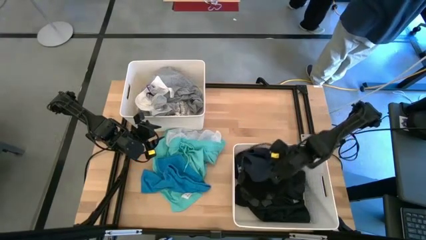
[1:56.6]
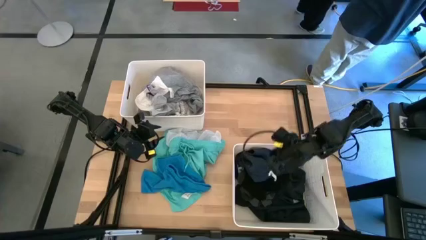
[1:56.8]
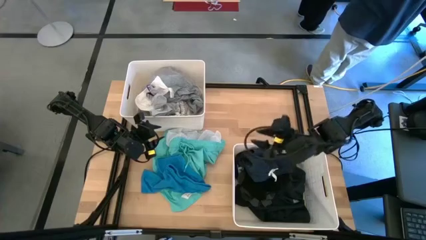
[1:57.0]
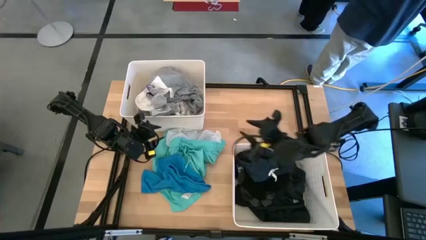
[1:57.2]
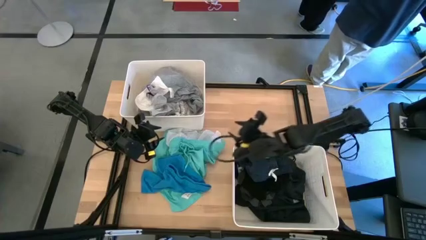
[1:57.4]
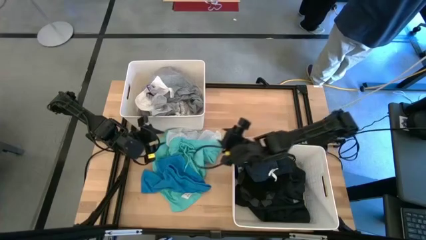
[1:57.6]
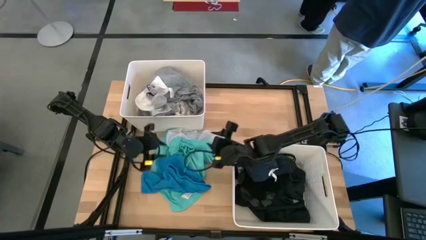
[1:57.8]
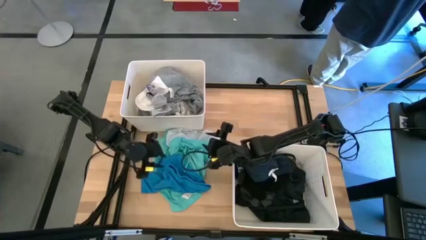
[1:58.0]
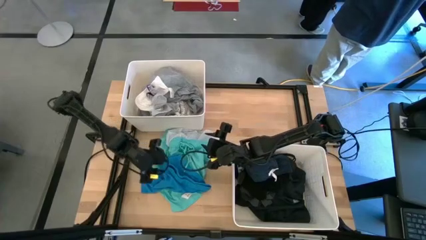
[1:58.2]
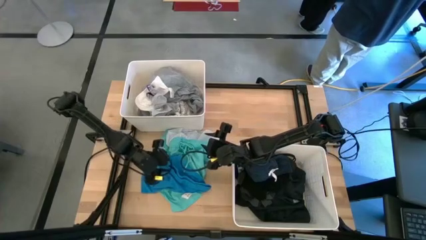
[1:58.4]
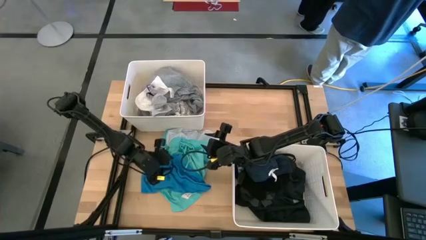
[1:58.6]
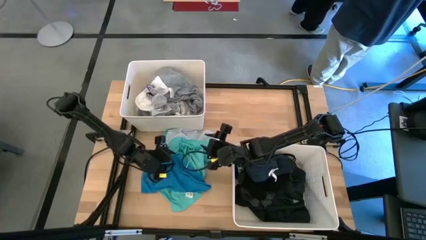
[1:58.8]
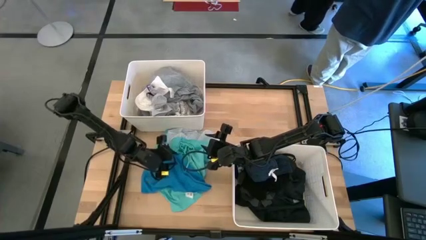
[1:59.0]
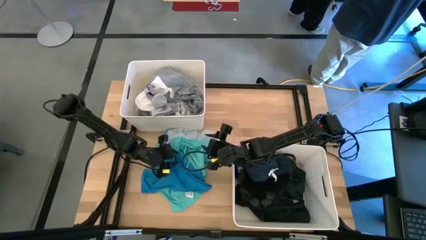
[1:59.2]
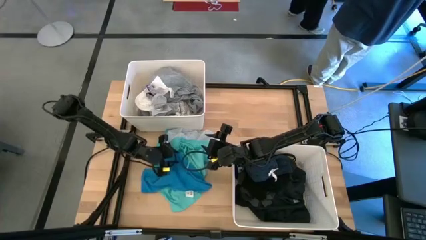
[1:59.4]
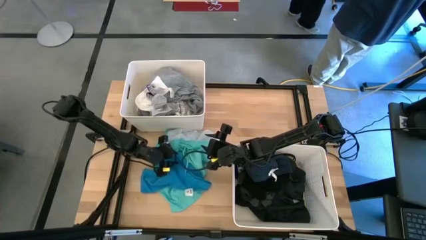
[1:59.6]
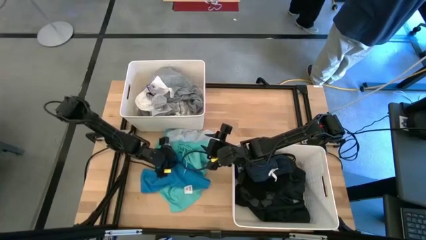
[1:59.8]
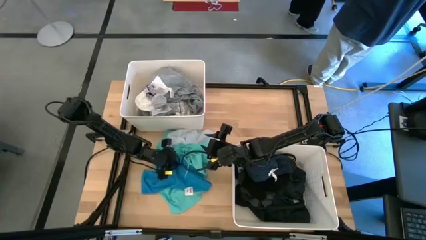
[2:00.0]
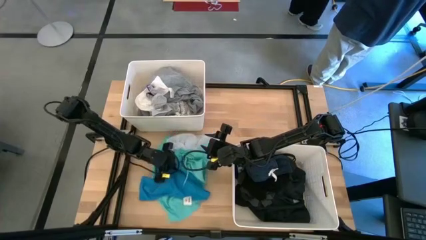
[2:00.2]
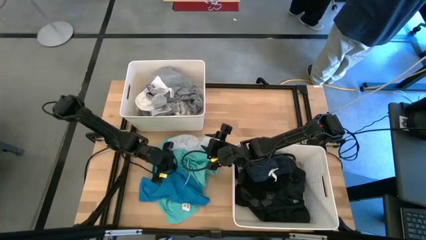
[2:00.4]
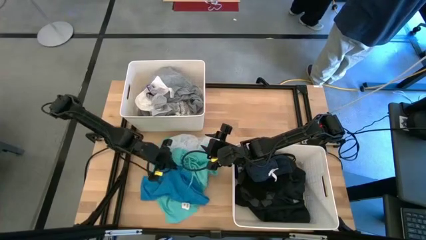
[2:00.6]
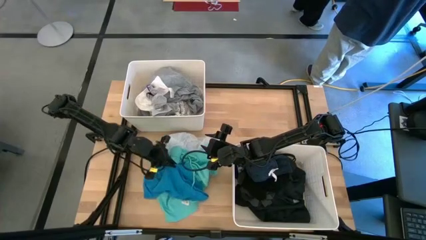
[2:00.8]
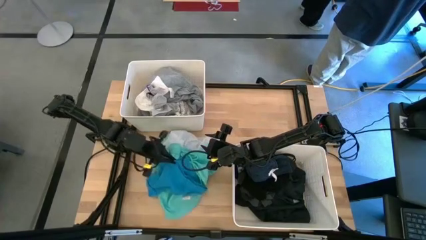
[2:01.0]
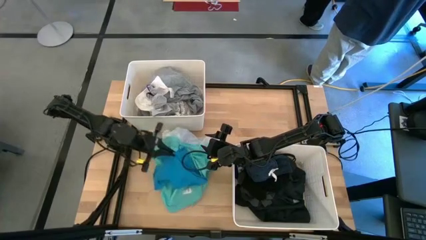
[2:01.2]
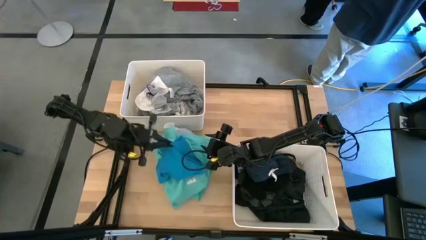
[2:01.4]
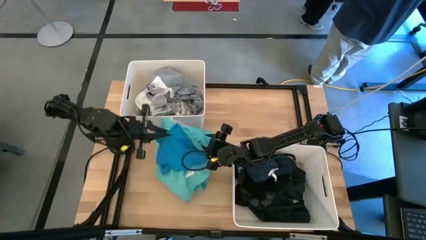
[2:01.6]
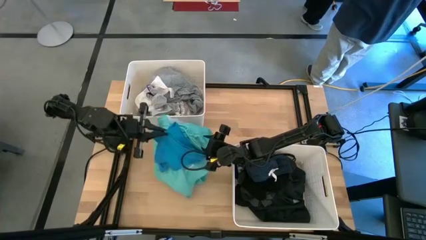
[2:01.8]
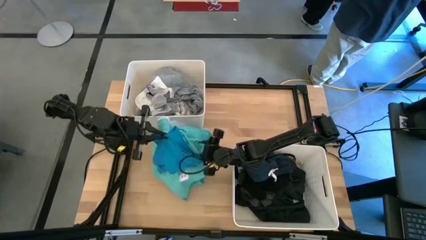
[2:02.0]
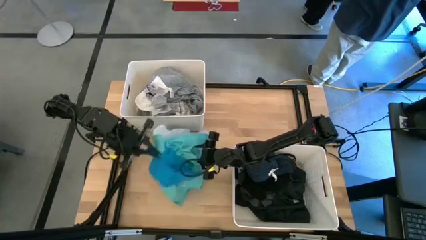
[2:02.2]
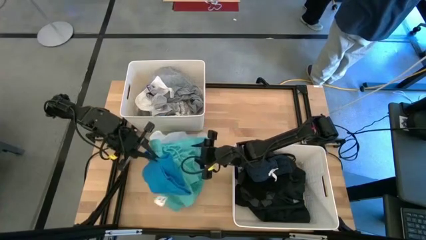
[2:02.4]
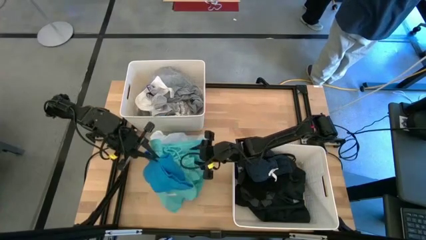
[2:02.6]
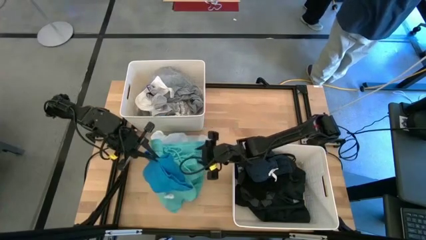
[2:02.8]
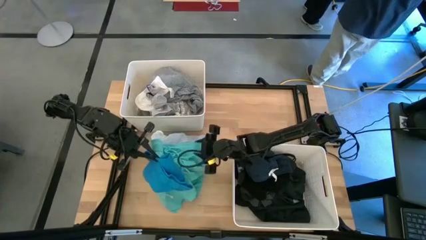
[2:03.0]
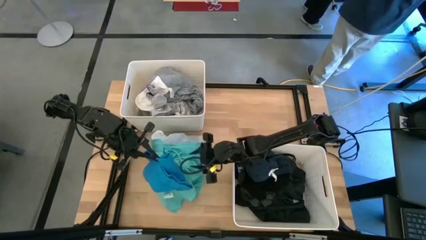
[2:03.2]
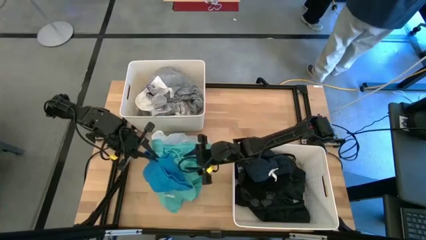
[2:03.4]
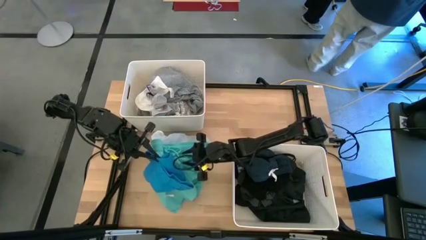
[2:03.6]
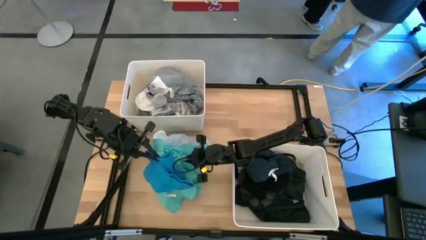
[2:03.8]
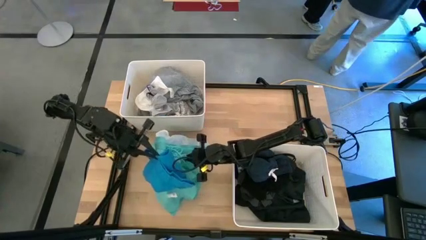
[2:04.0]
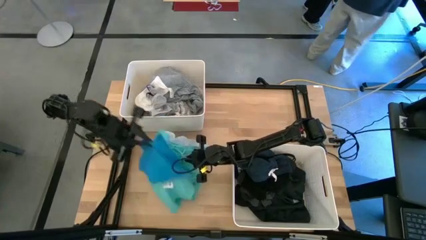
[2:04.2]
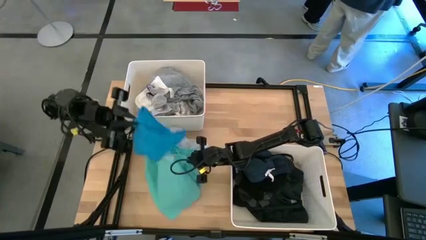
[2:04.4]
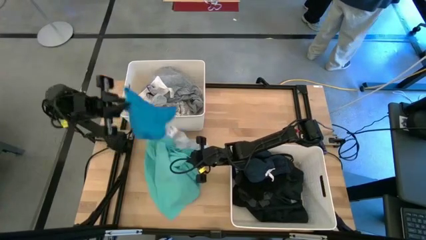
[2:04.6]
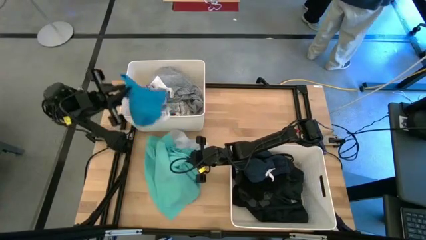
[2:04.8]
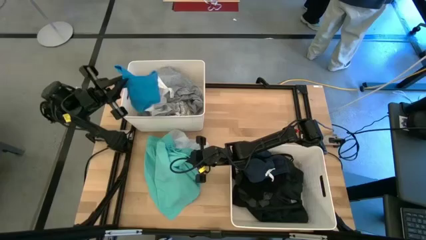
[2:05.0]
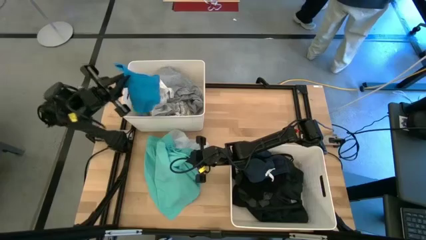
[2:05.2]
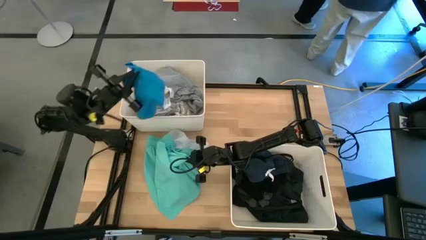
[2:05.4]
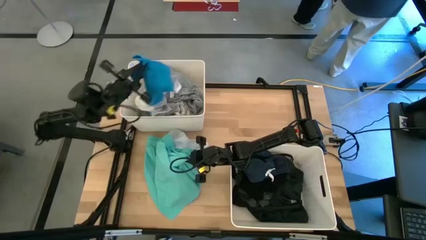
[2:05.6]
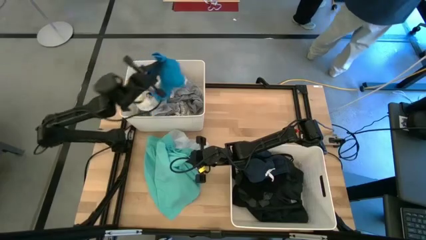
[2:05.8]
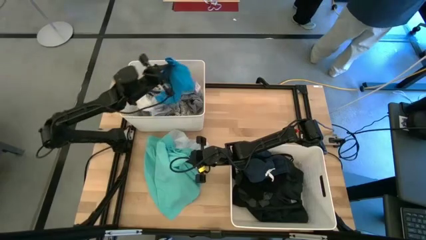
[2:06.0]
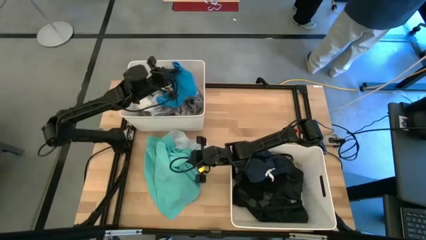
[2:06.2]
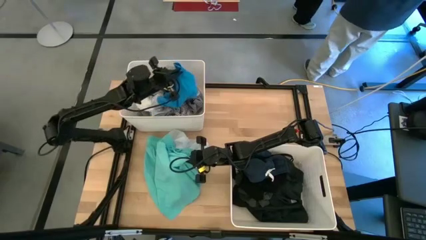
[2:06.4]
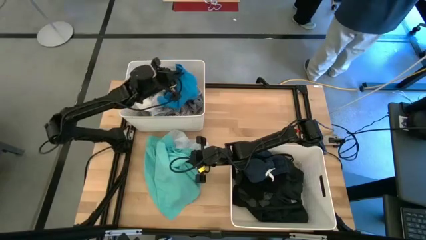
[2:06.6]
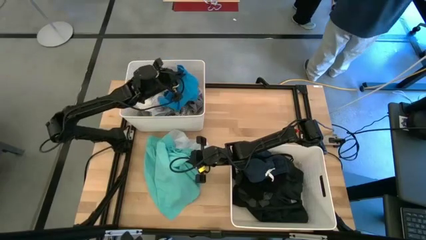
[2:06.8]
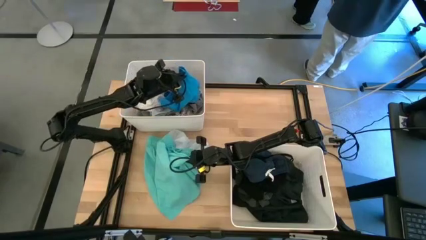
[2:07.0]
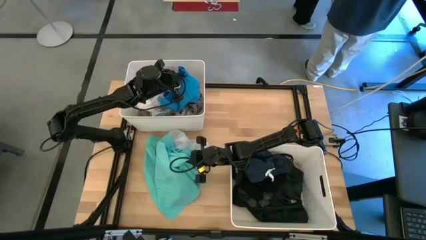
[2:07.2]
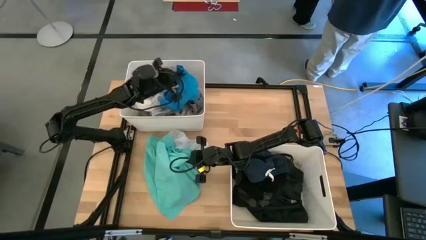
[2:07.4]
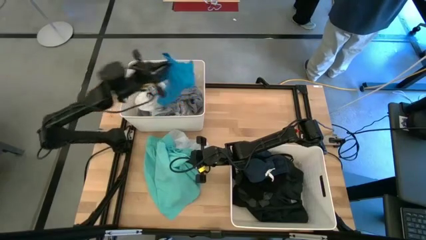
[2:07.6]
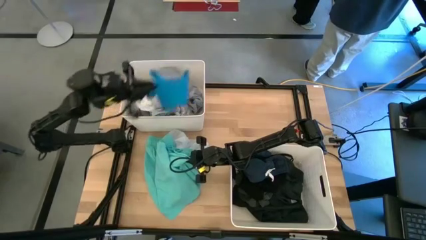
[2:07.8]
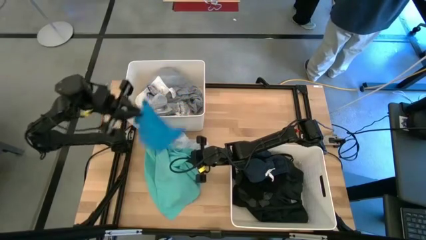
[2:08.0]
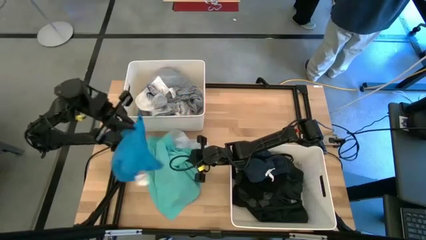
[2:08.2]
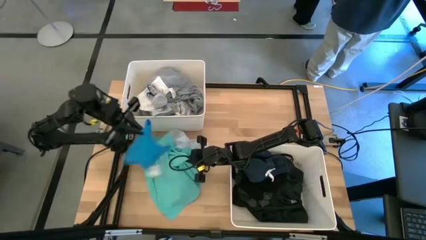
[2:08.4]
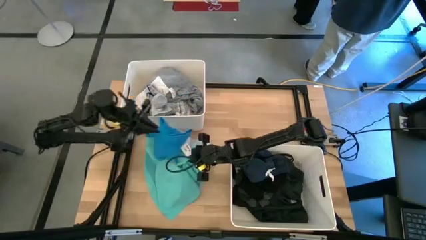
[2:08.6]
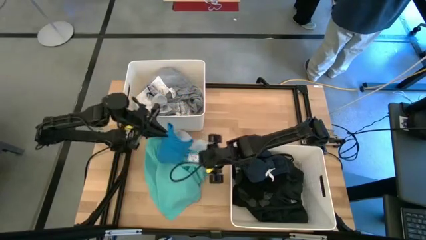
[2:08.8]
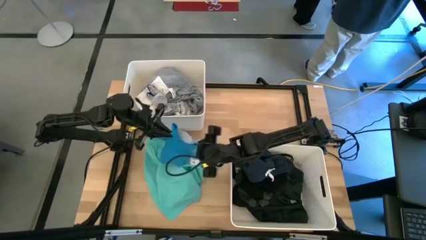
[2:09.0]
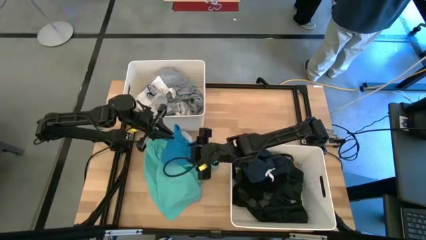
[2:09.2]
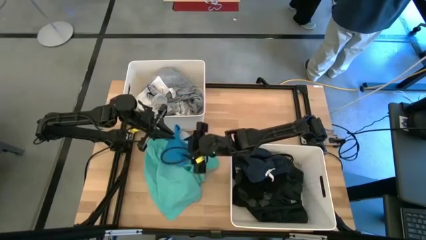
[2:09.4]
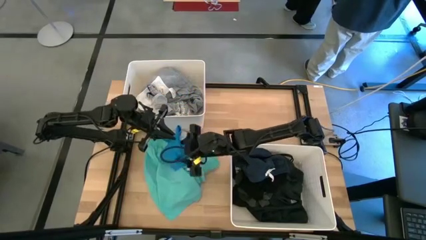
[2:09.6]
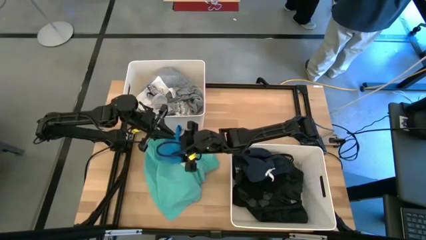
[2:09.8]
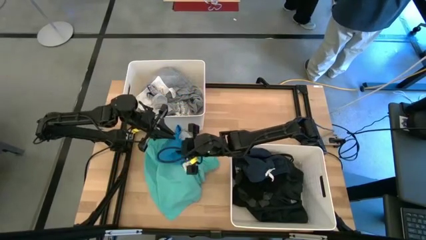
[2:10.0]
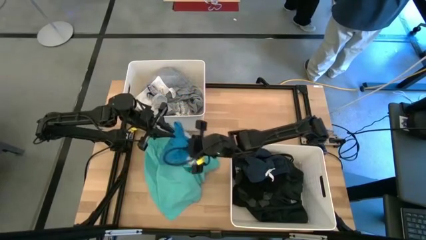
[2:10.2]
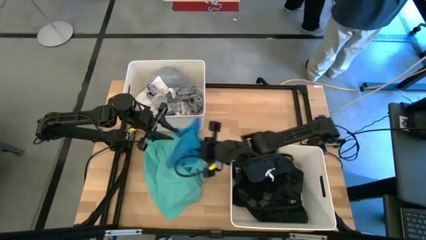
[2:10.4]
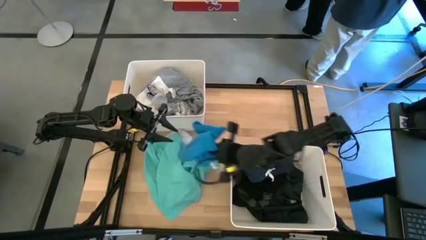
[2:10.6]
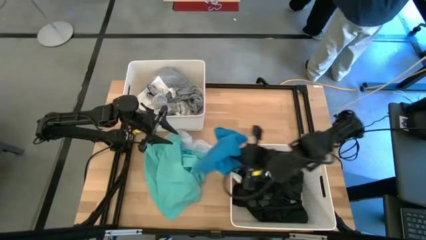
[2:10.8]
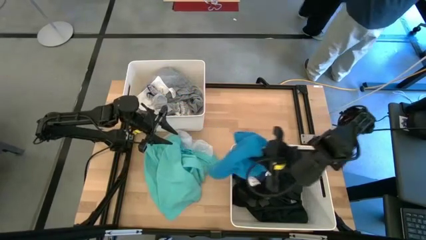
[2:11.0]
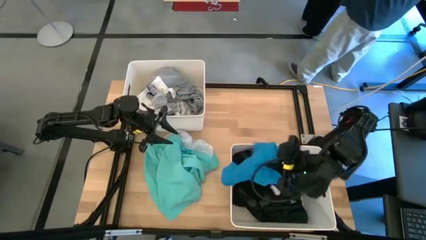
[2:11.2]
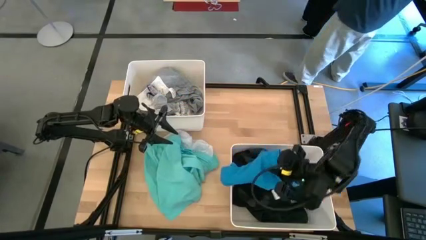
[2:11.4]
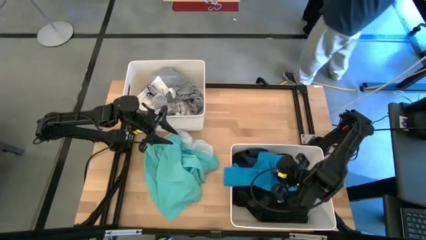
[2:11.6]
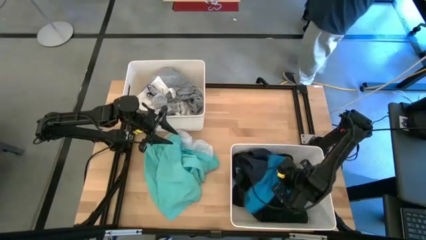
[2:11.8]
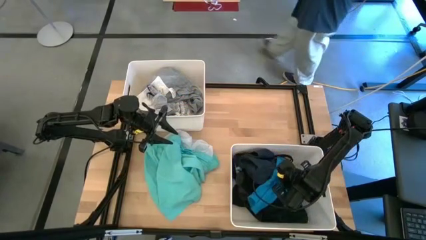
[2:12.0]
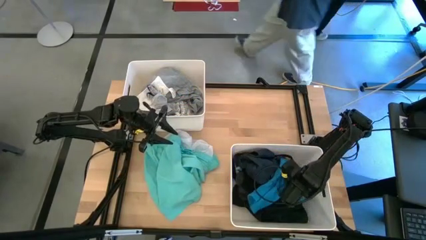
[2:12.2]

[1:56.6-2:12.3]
Task: Sort clothes
Put the blue shorts into the bottom right laundry bin
